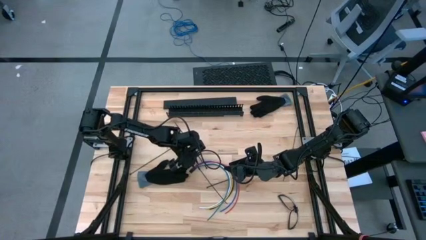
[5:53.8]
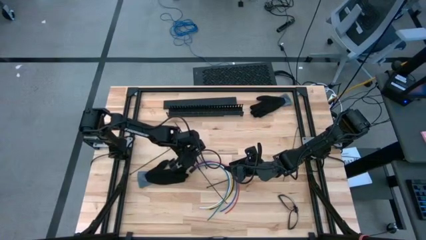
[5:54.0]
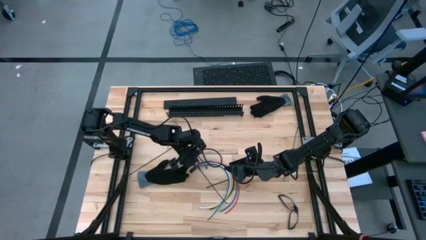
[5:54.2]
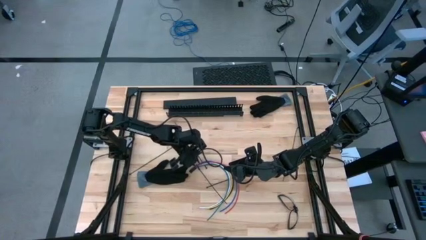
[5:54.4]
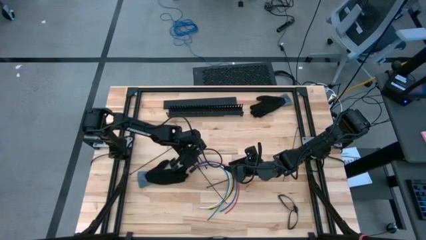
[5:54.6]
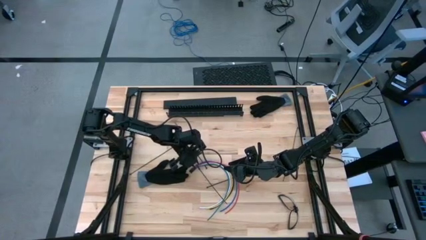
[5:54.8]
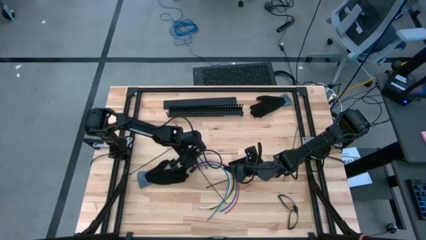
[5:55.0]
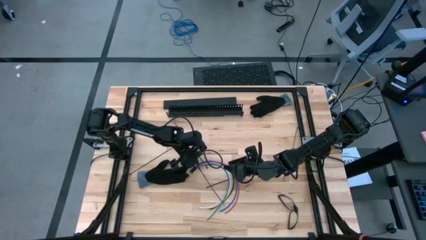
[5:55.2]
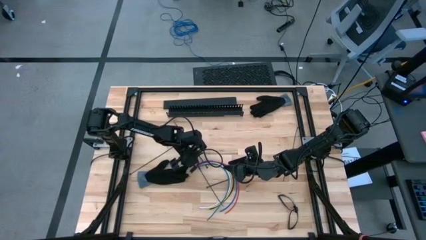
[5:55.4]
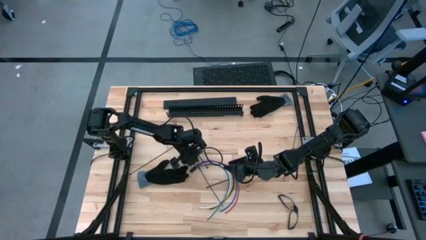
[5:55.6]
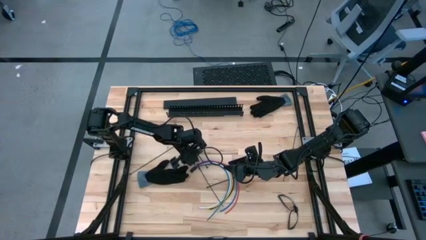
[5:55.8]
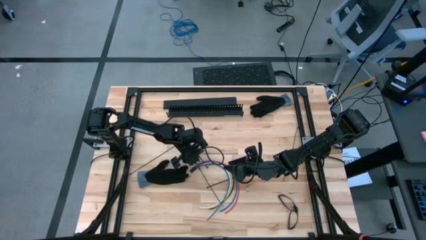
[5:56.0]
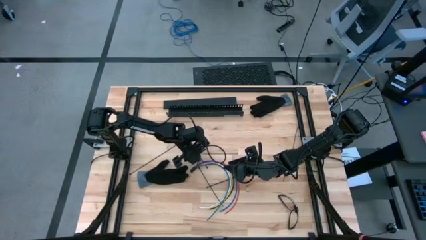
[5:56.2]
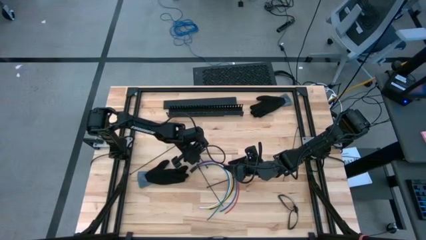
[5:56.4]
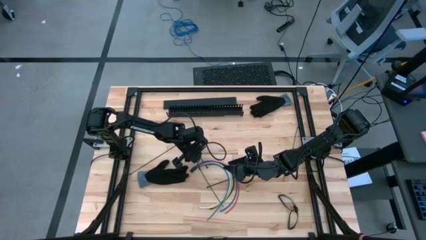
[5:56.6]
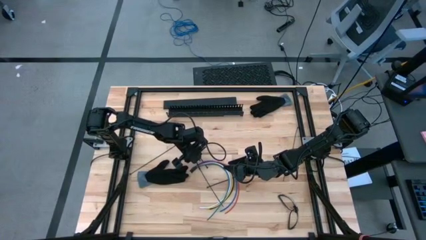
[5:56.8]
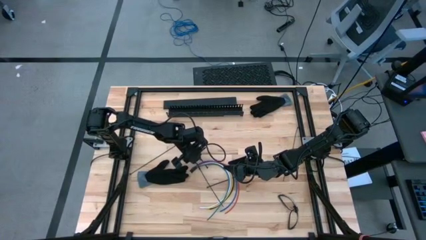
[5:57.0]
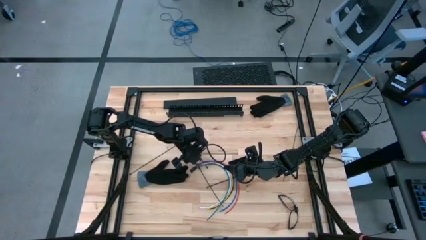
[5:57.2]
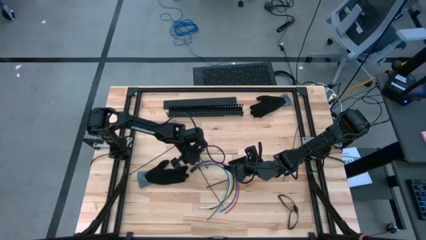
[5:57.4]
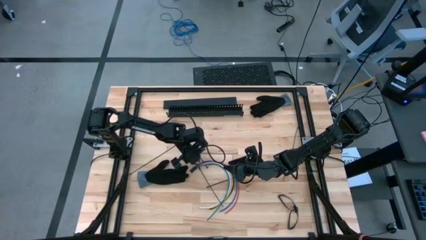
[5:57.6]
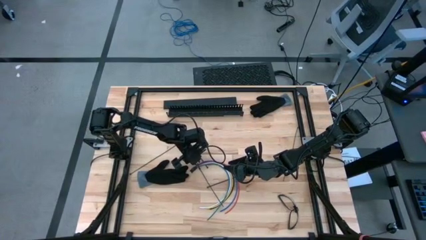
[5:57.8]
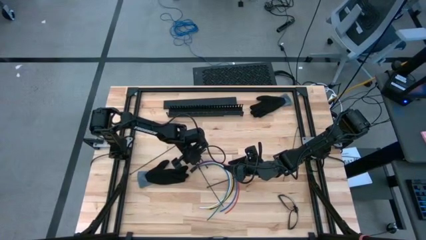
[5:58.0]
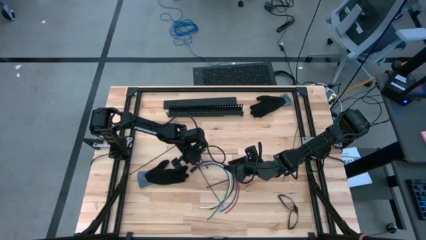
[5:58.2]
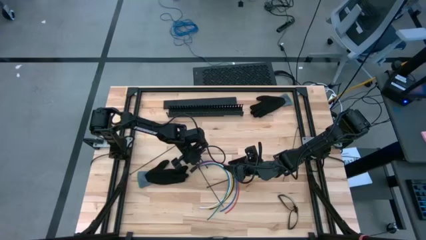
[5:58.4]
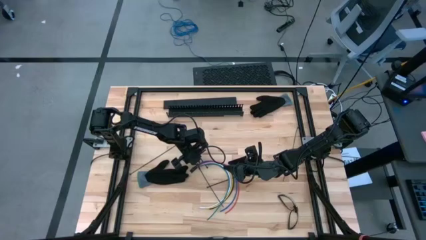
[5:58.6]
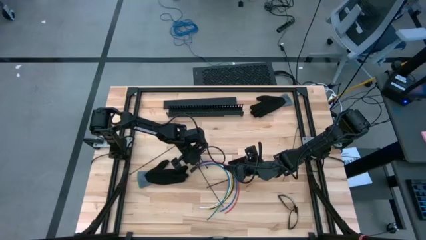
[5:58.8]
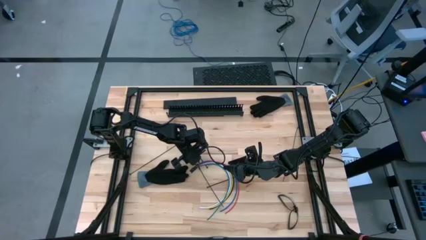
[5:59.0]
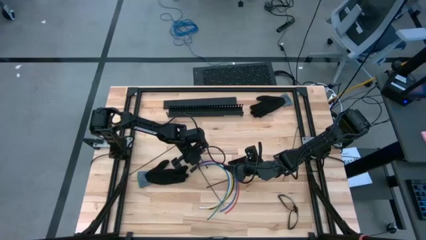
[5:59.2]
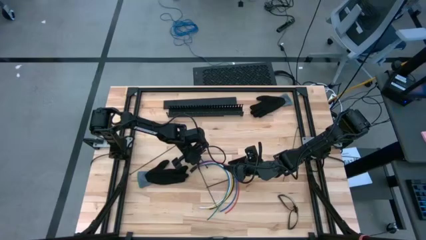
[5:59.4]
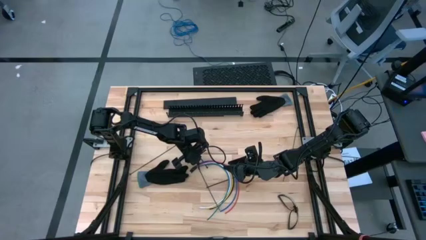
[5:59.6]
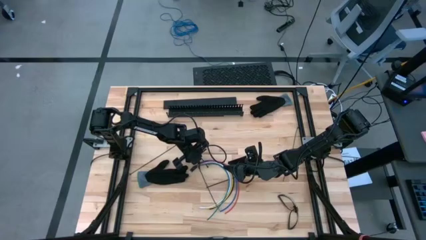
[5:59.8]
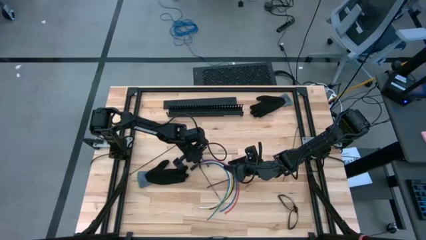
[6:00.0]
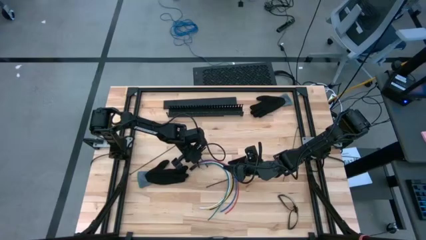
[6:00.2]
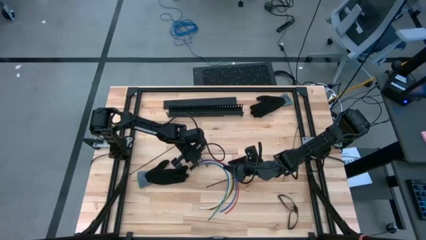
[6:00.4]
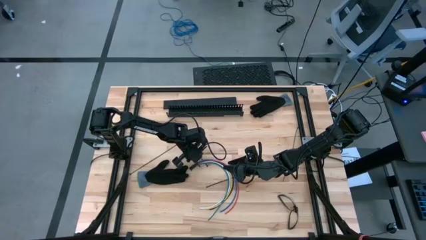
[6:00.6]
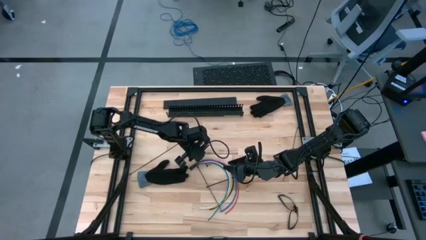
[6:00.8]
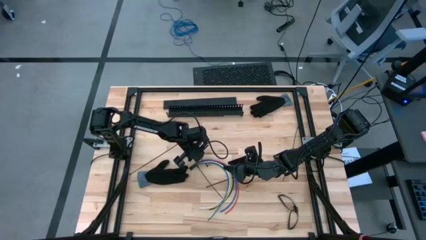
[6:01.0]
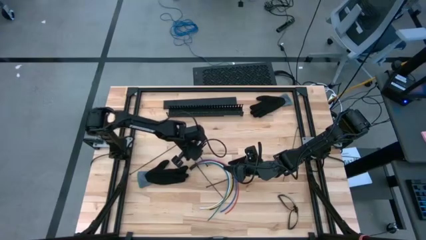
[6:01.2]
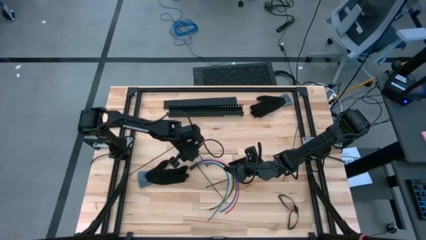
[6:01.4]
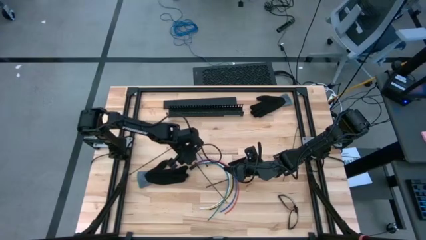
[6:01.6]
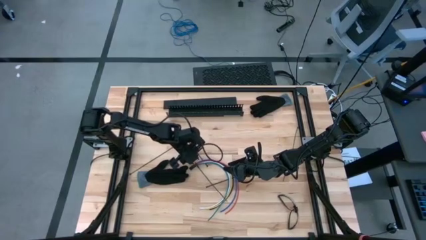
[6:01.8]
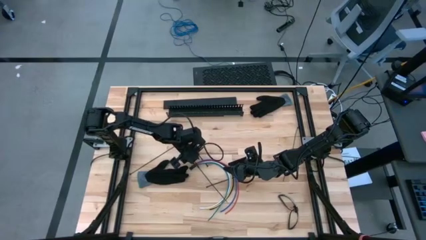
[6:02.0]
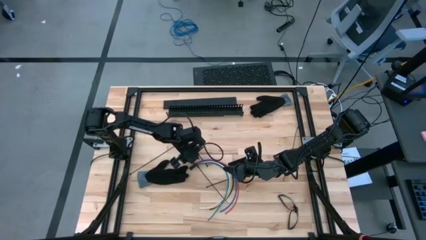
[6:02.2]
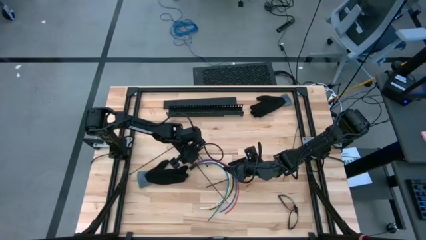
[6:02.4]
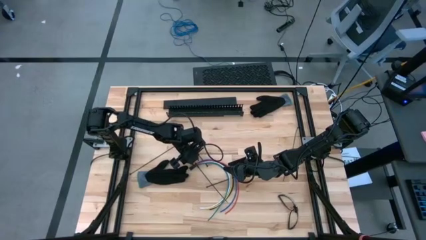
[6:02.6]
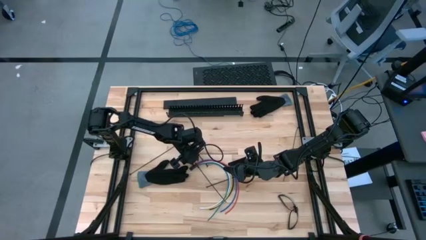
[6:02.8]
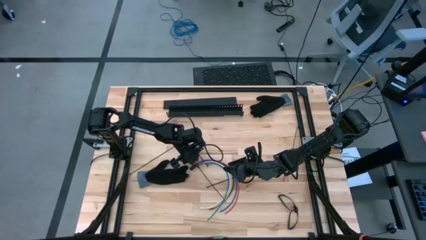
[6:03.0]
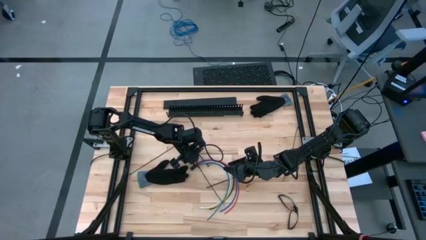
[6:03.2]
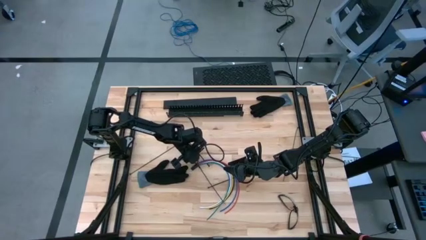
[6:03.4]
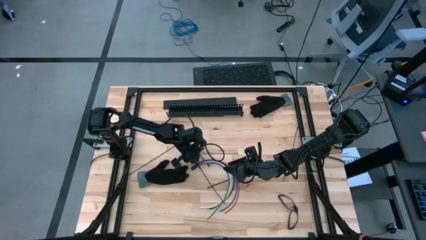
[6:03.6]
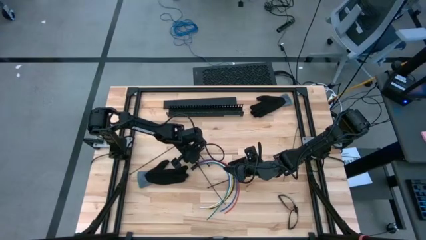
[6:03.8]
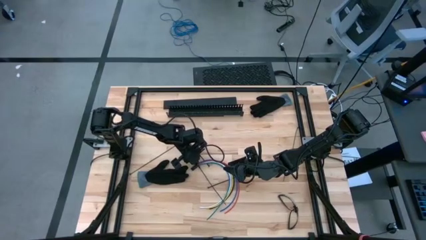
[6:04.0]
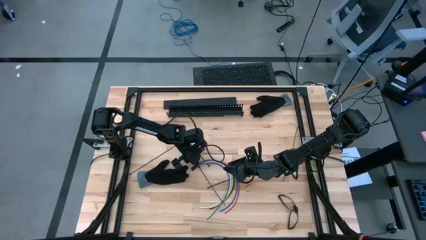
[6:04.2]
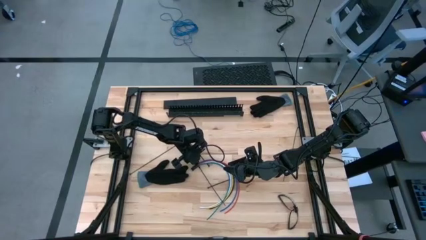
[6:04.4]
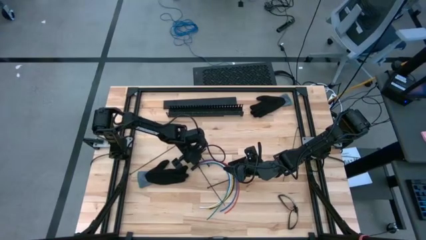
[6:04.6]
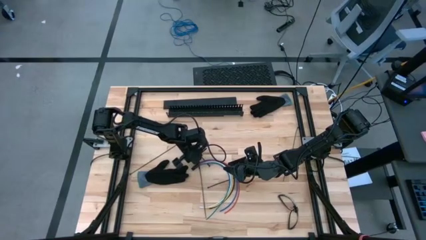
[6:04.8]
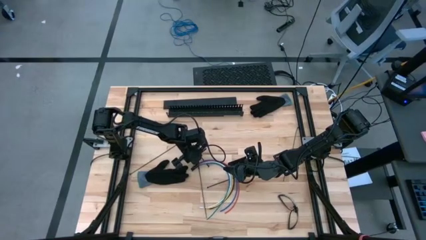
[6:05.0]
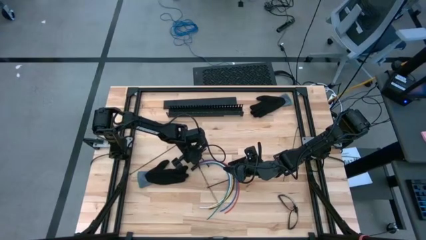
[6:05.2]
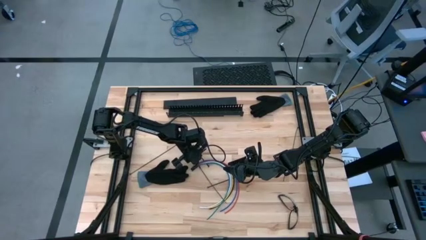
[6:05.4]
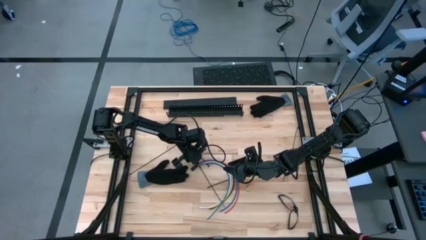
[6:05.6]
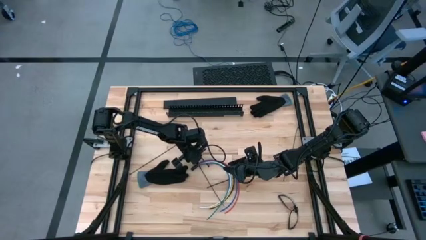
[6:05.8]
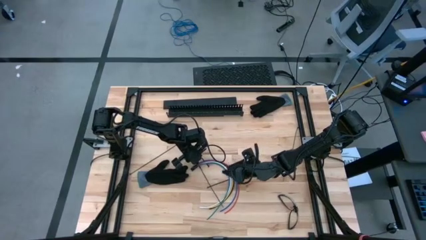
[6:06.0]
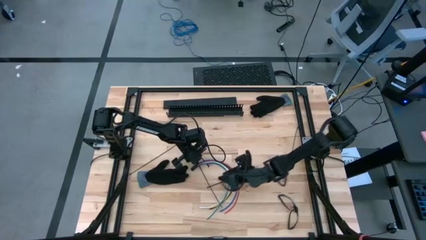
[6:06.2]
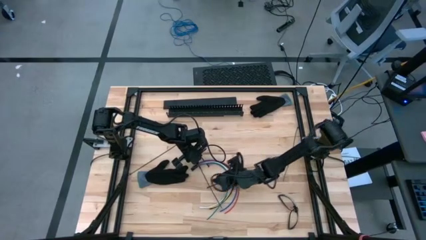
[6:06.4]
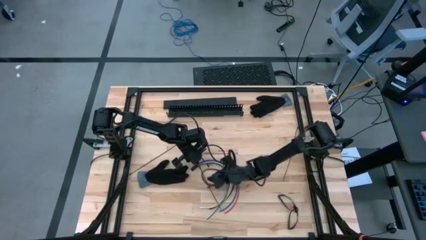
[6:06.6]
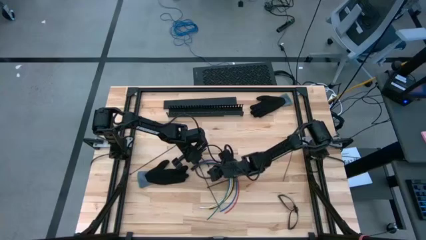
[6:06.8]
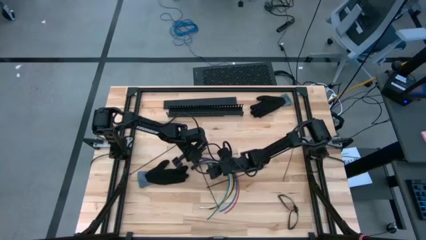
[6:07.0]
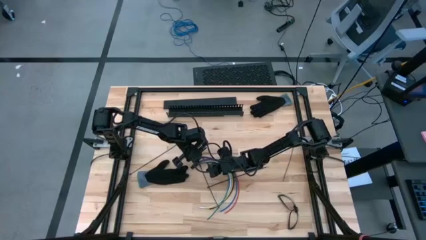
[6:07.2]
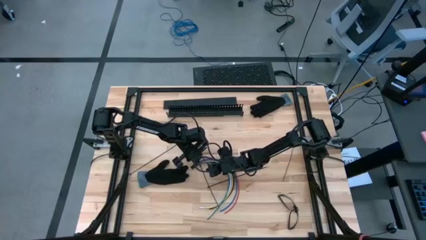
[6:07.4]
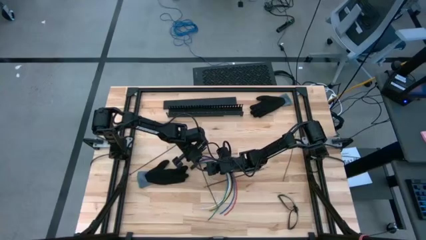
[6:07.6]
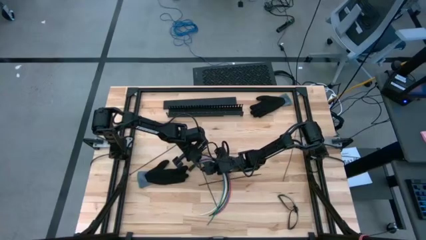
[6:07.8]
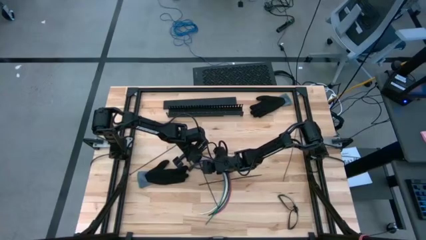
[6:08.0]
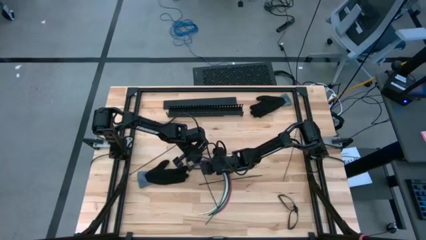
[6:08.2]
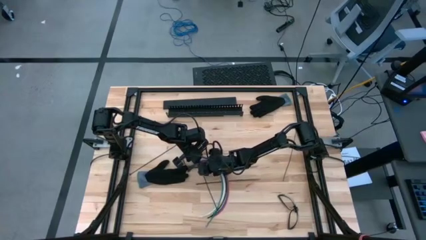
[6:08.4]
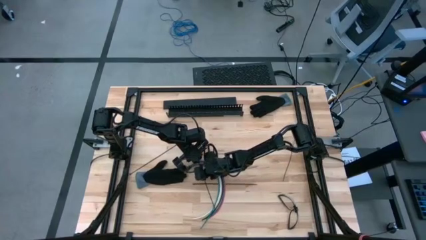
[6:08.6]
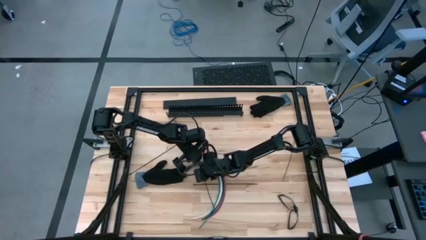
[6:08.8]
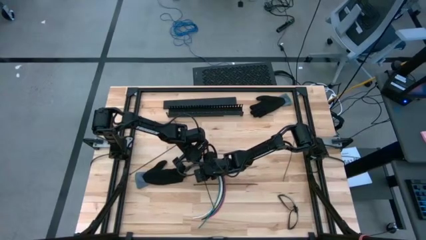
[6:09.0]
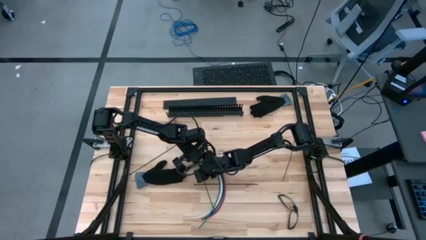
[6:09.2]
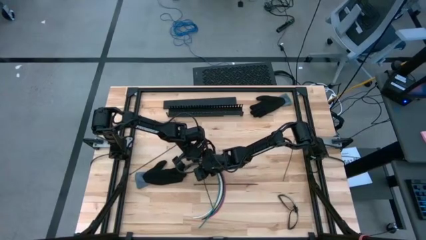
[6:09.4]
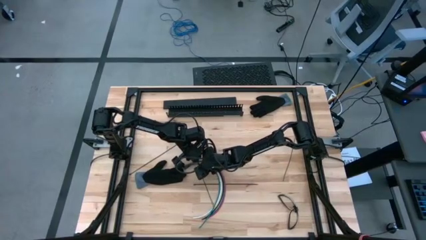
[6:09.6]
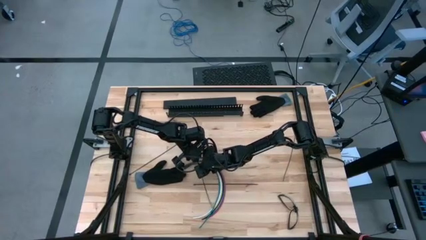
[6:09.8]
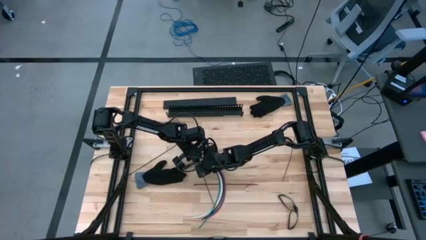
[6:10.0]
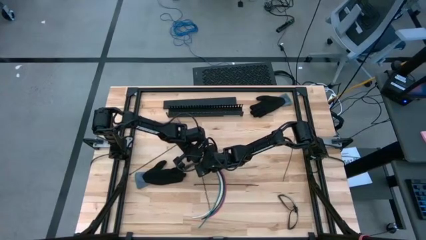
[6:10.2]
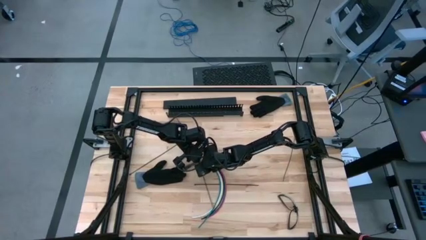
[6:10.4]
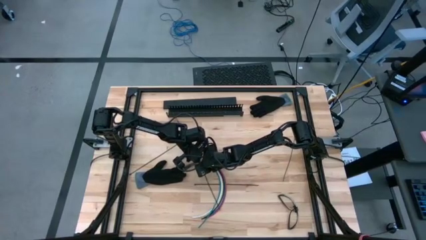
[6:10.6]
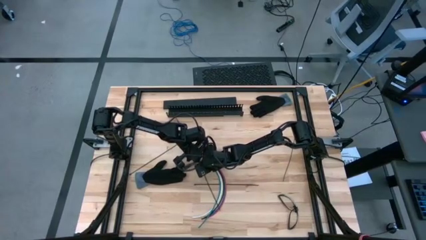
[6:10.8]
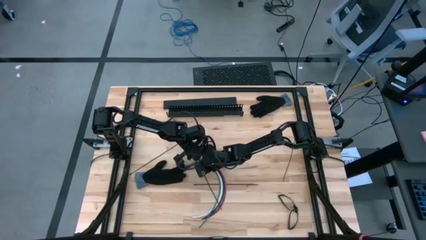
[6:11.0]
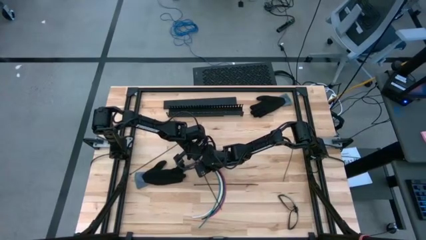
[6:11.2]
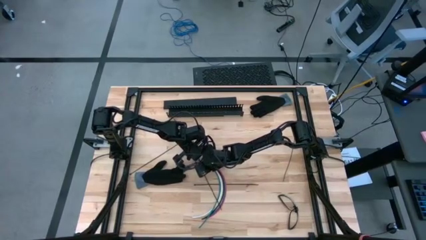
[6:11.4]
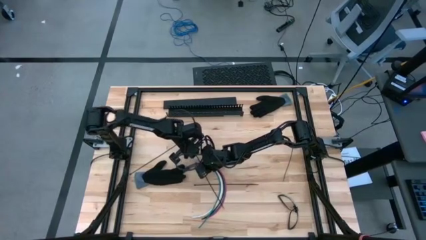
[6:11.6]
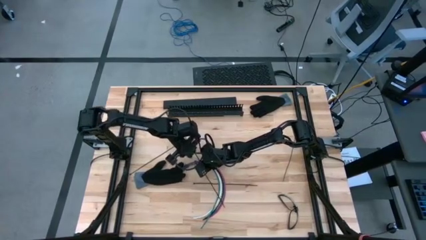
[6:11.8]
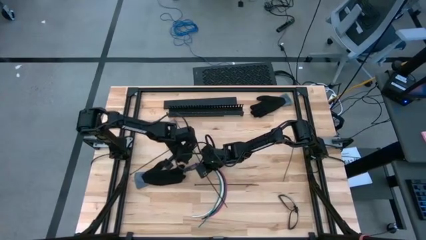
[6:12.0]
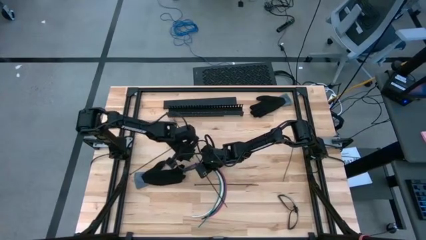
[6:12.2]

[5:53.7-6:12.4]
Task: Ziptie cables
Wrap the cable wires using a zip tie
